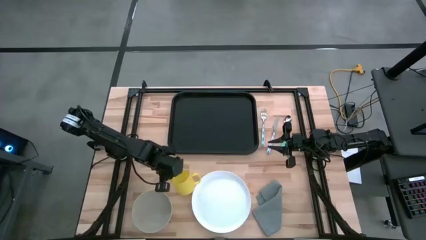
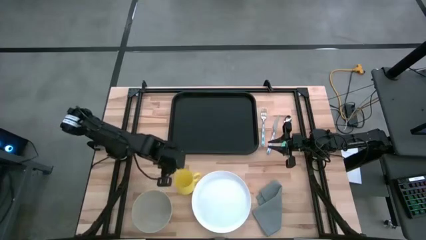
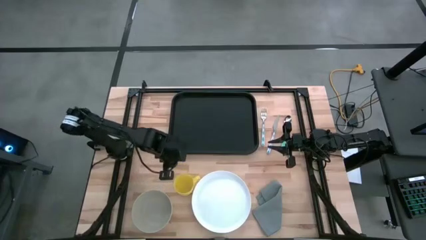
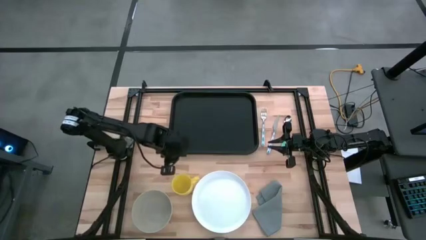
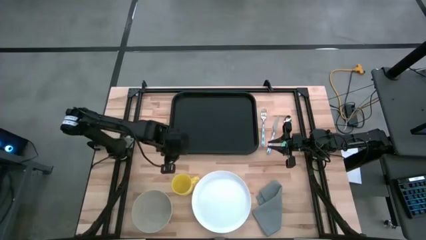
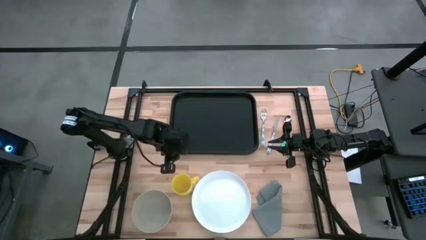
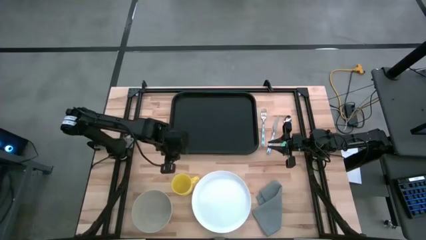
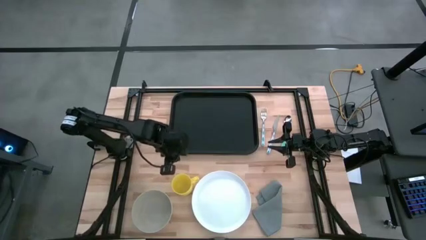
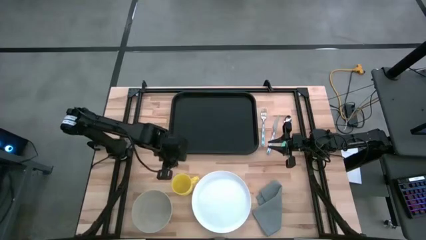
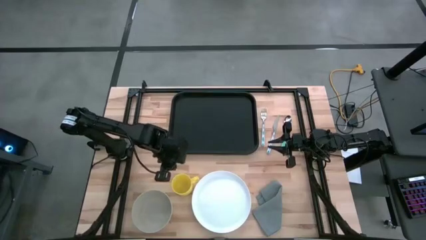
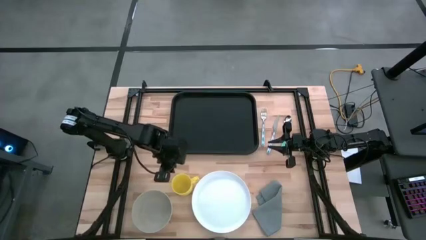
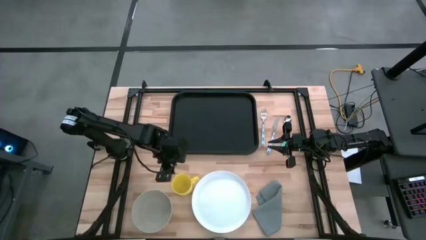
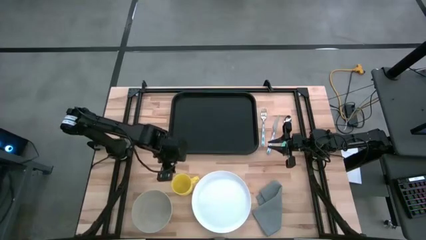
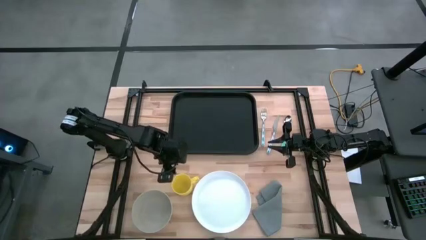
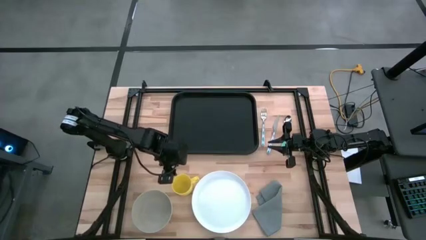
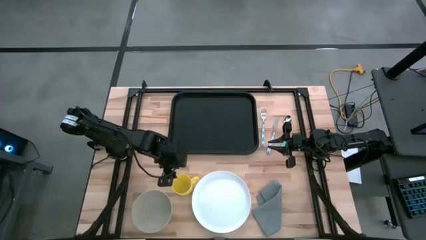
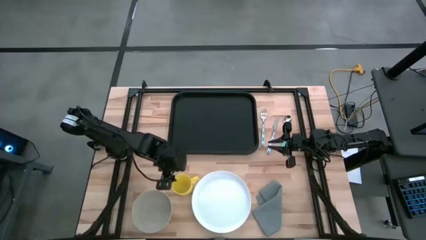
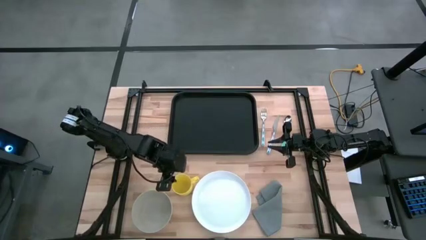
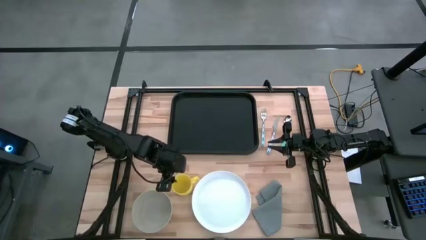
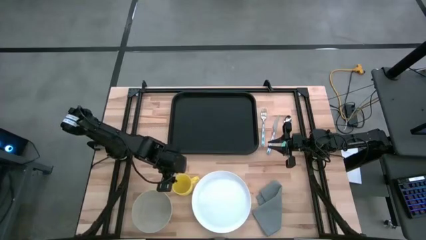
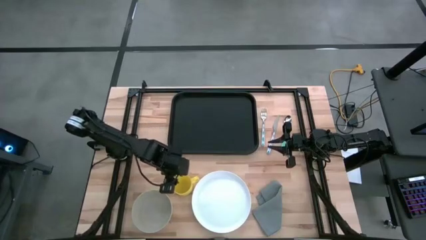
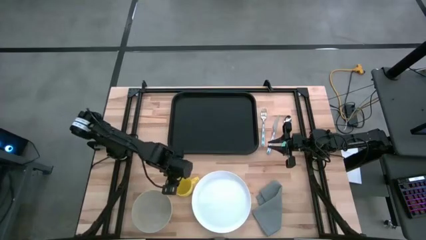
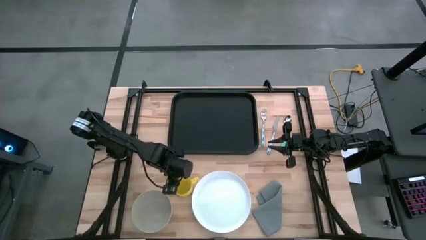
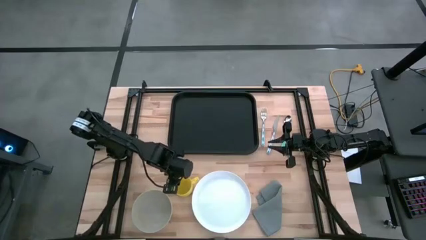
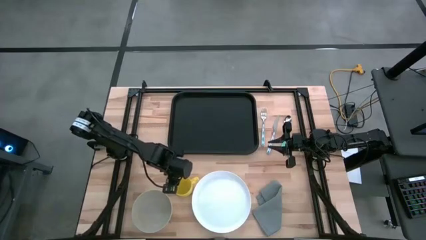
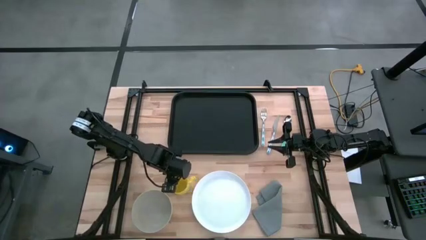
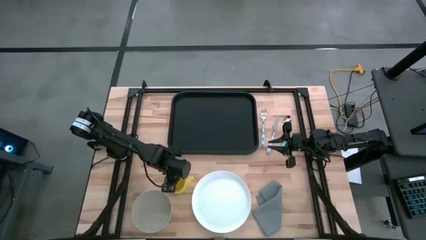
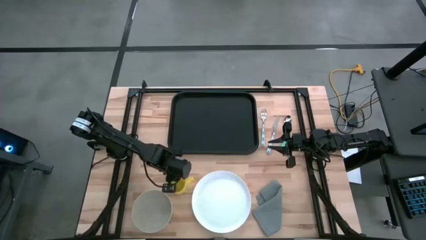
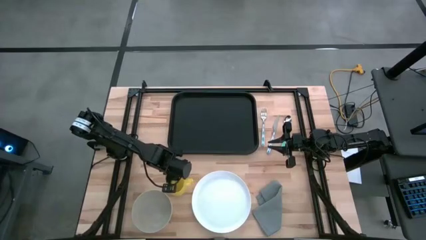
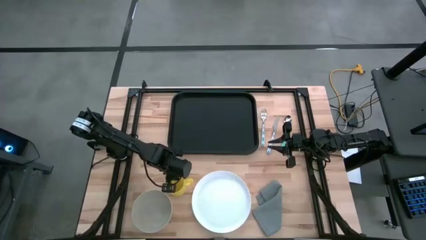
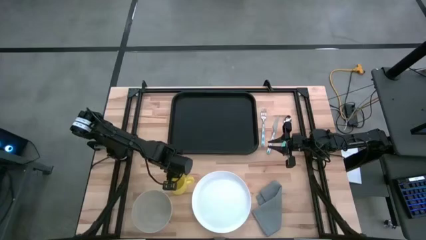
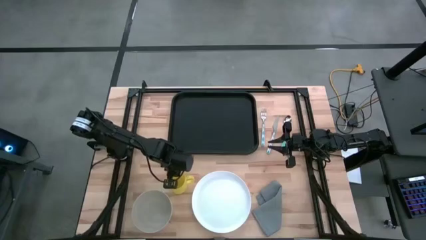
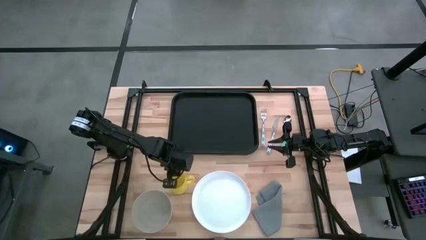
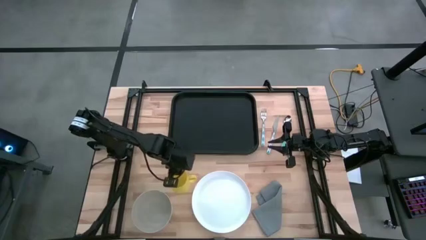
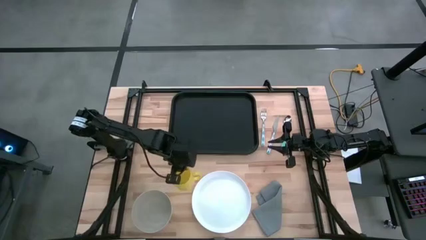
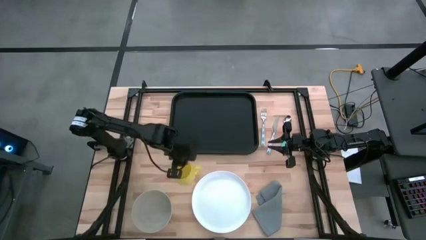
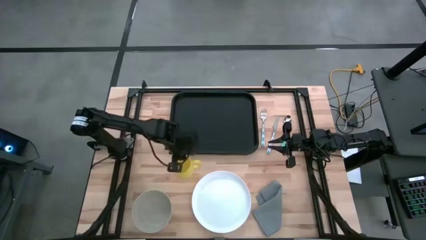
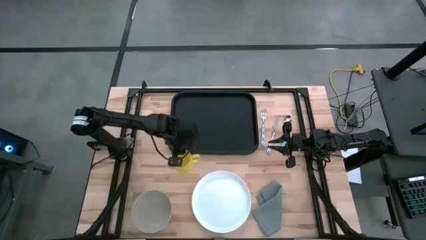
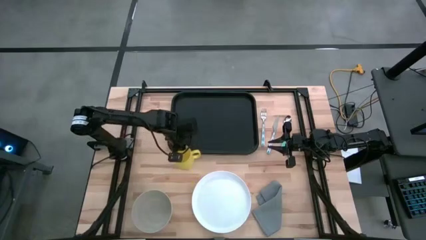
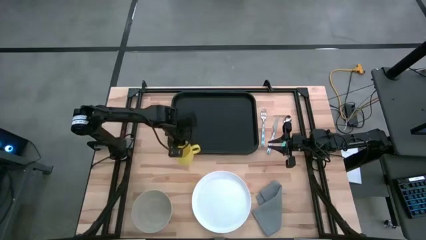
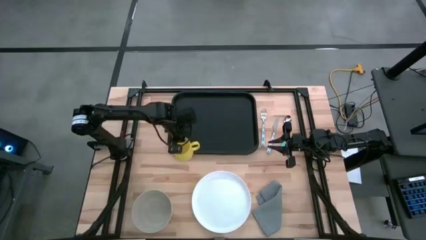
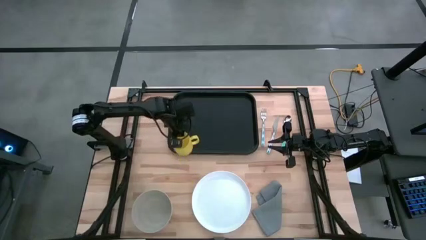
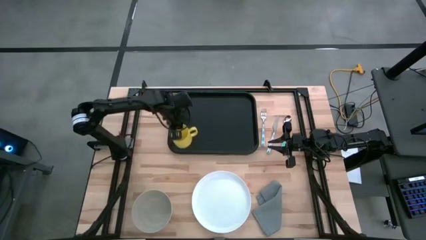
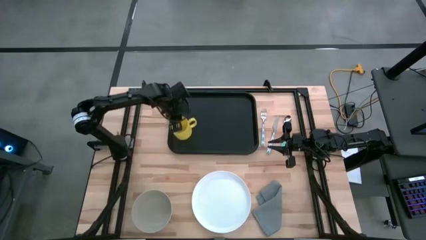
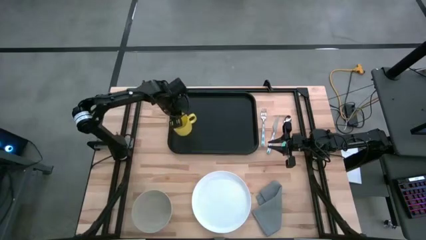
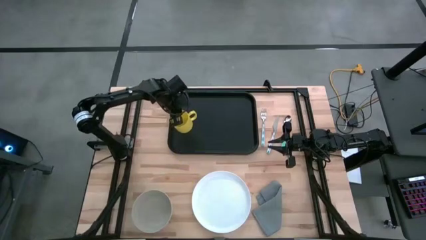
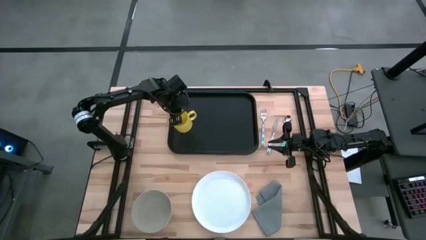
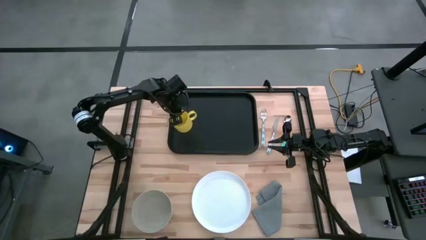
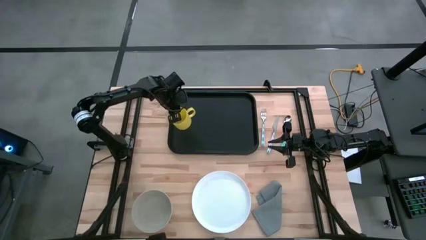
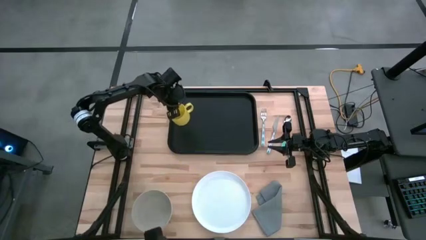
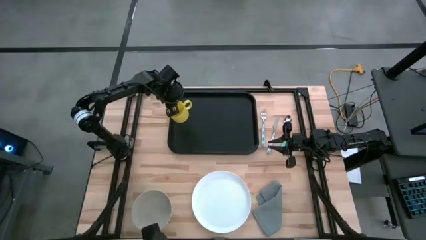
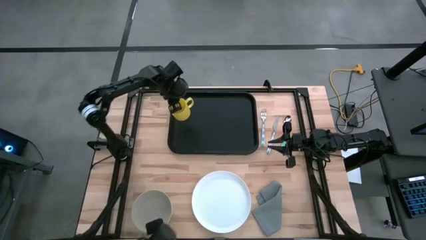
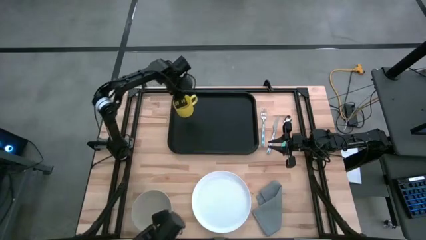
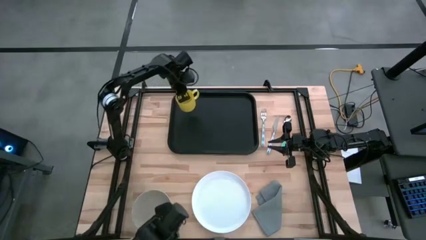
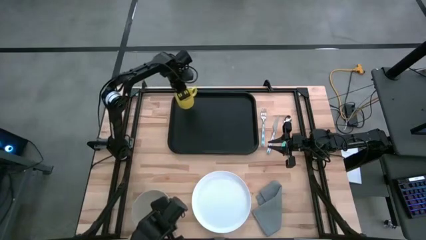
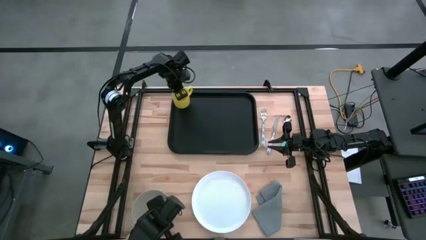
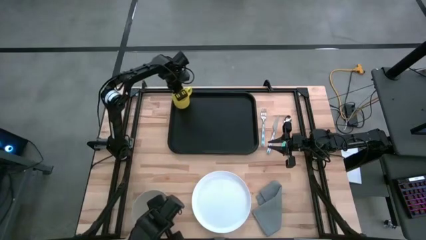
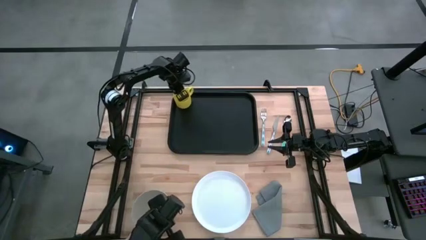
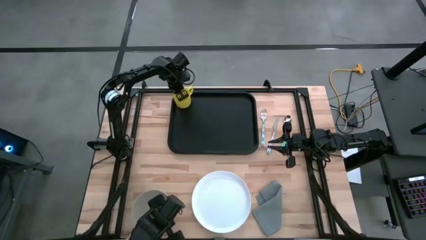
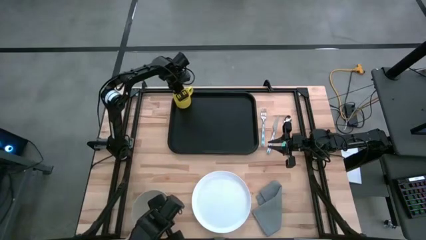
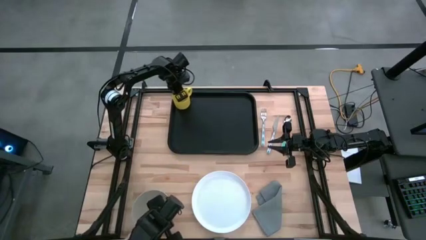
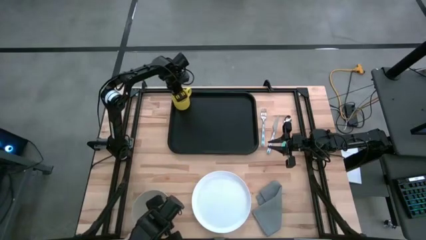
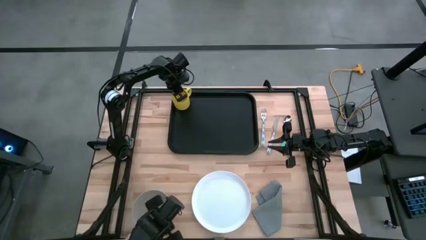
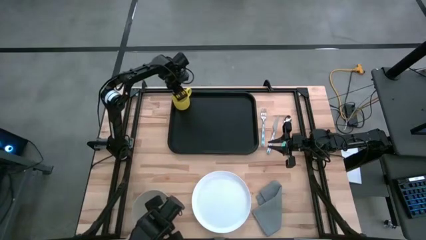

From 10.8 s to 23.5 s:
Task: Set up tray
Put the yellow cup on the black tray
